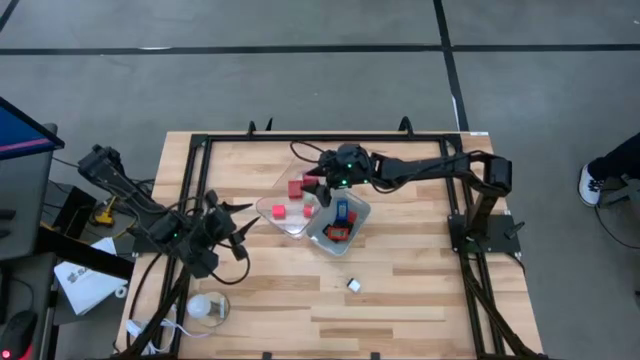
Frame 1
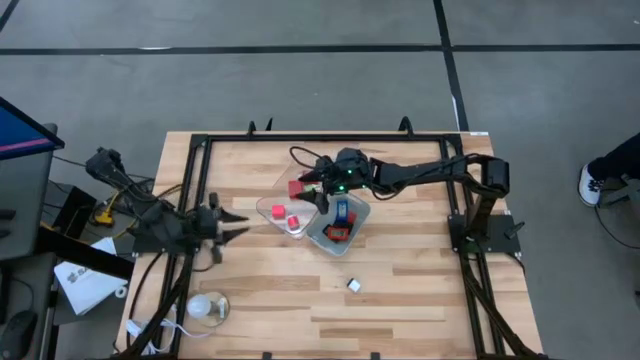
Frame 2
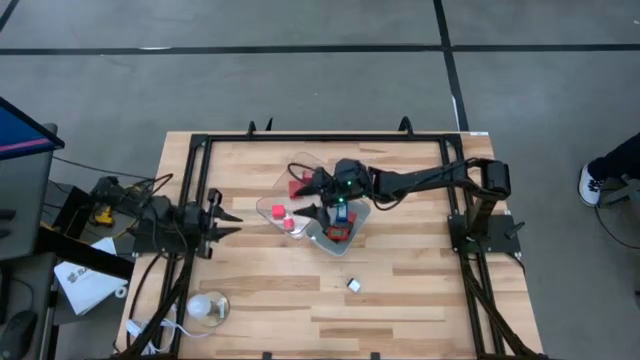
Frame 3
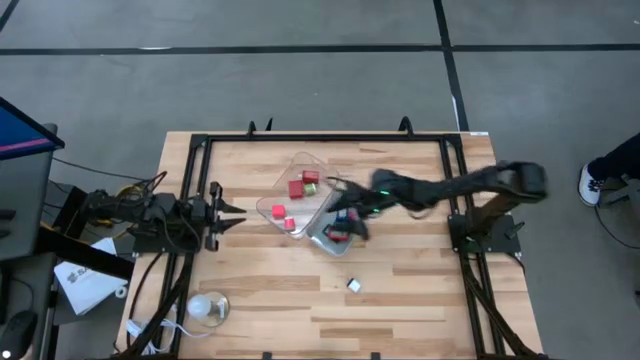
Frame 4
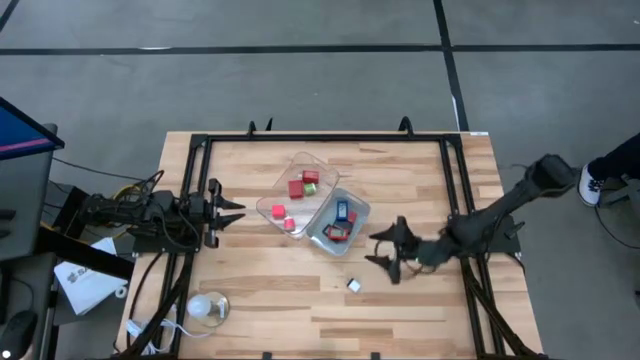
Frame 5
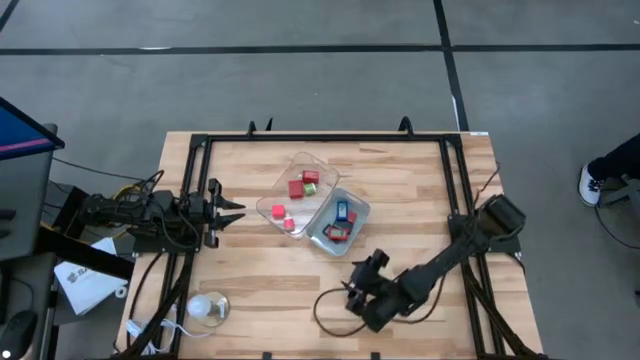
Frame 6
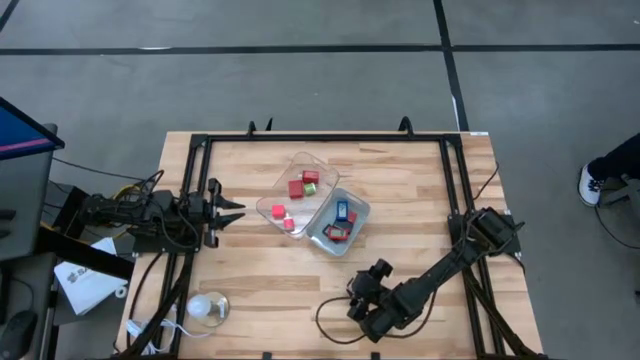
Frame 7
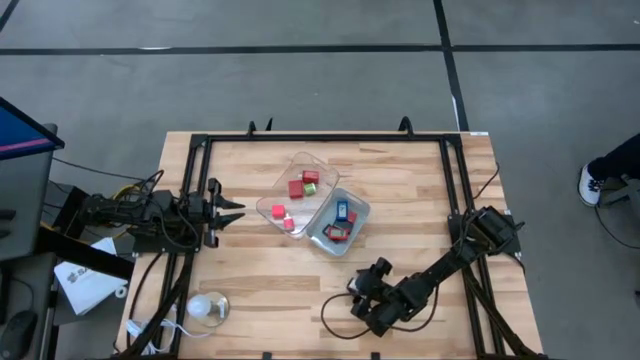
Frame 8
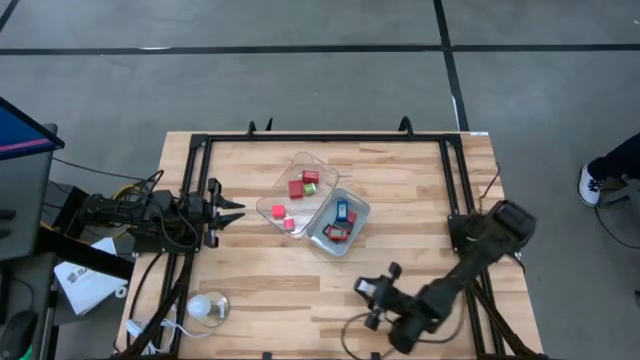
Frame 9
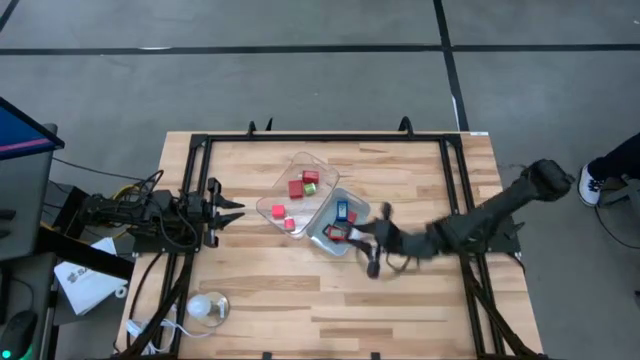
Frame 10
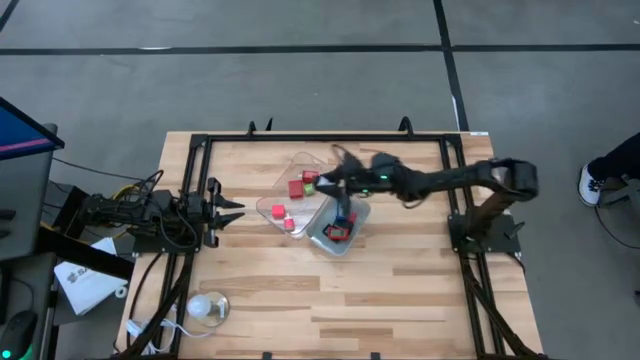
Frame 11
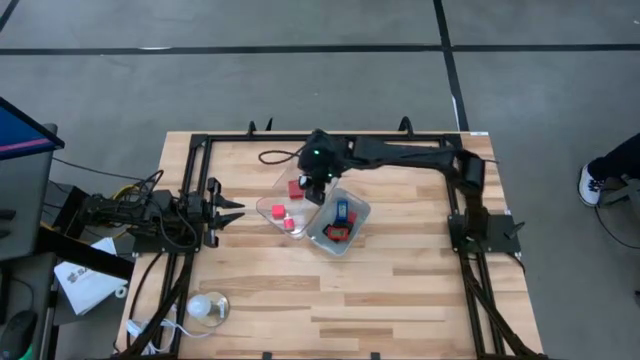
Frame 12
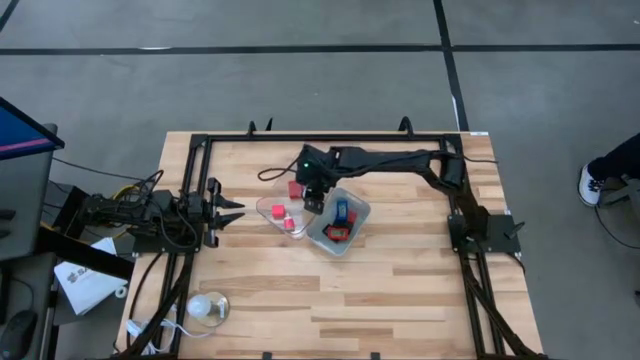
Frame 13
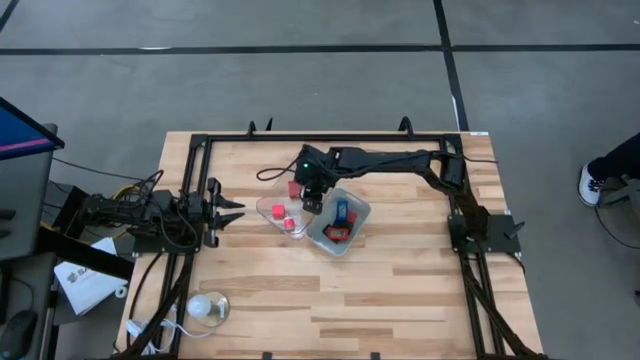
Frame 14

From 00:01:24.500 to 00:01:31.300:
Task: Pick & Place Office items
Put the white charger adapter into the transparent bin

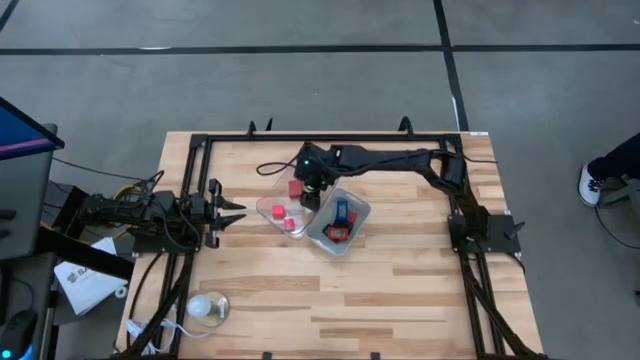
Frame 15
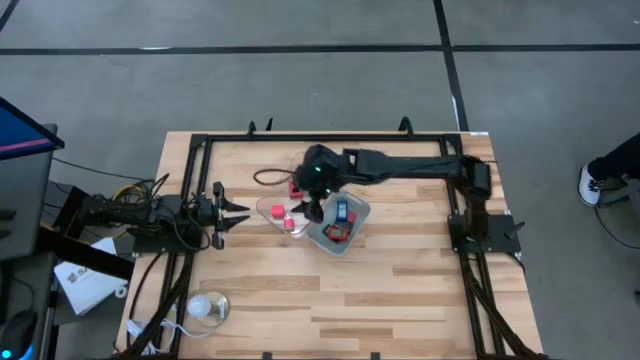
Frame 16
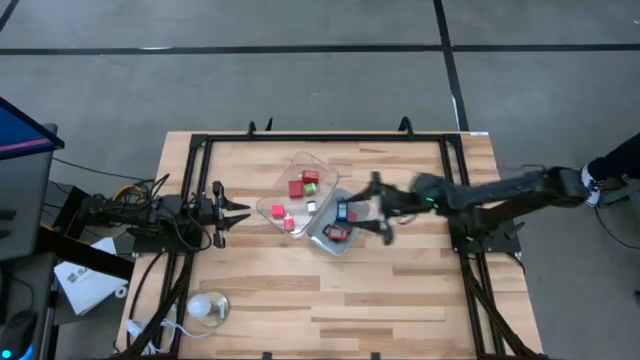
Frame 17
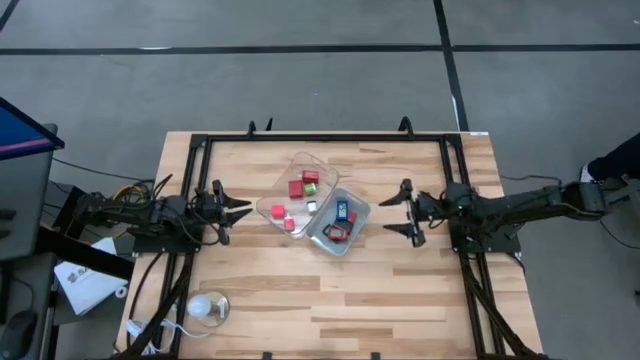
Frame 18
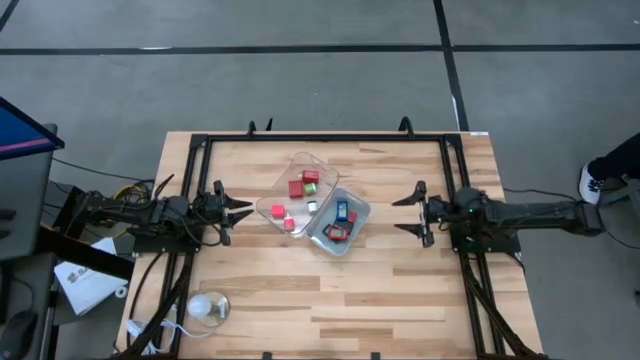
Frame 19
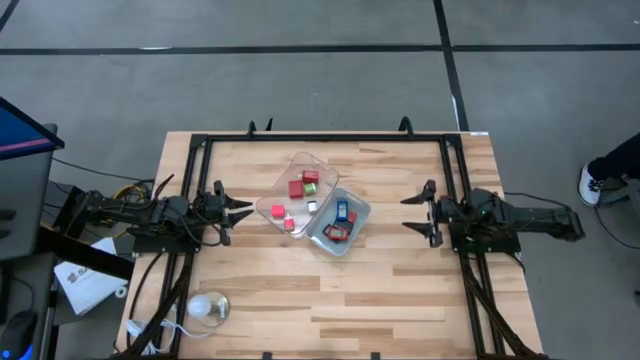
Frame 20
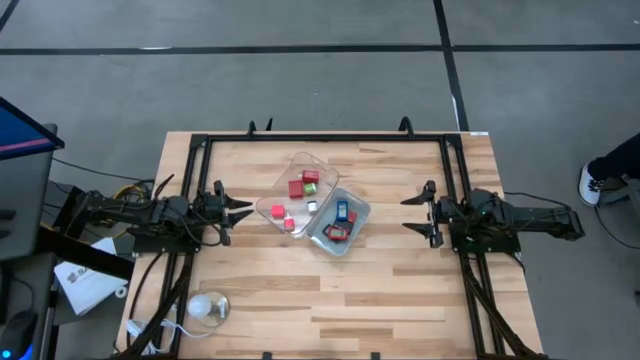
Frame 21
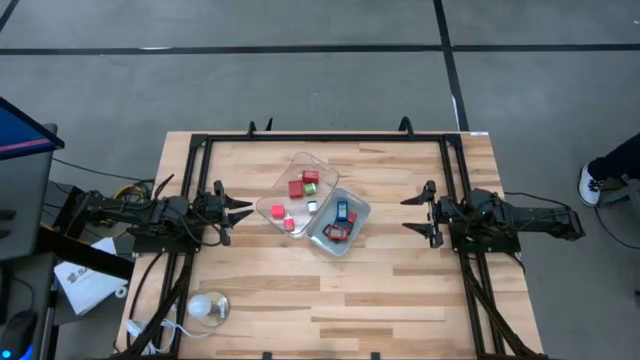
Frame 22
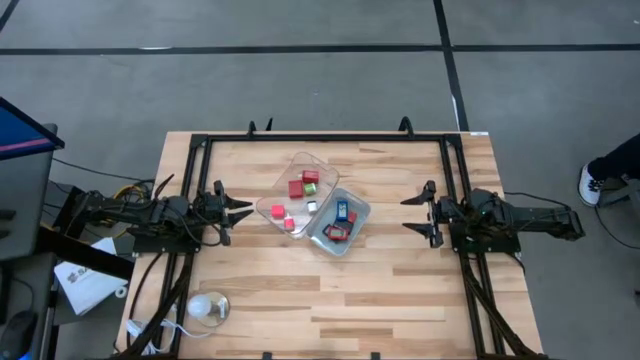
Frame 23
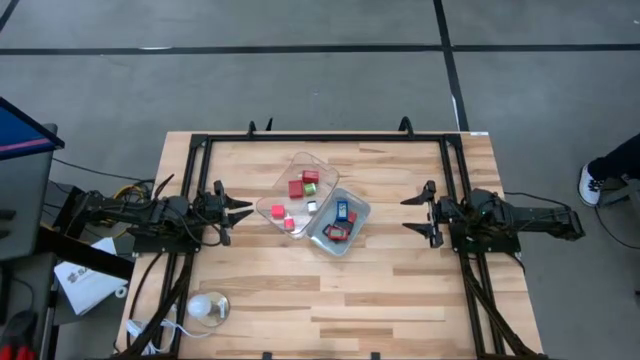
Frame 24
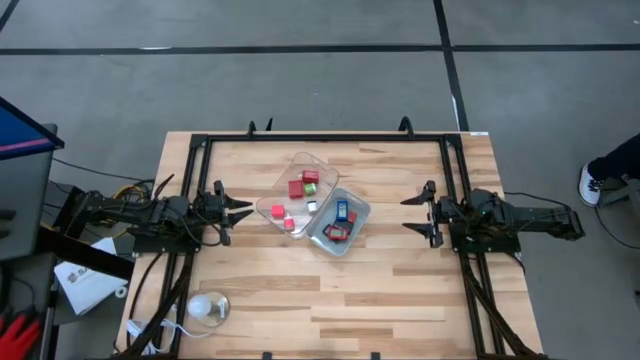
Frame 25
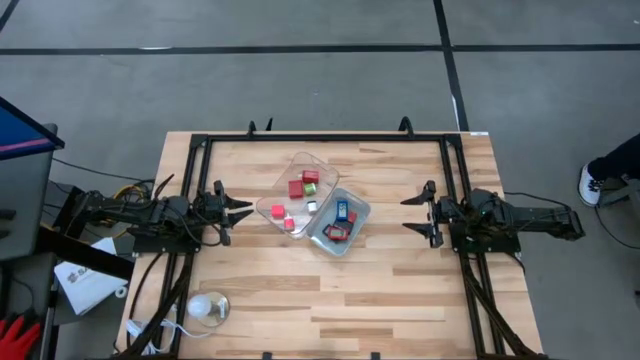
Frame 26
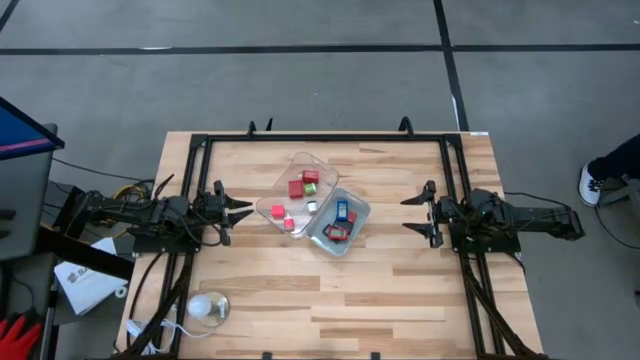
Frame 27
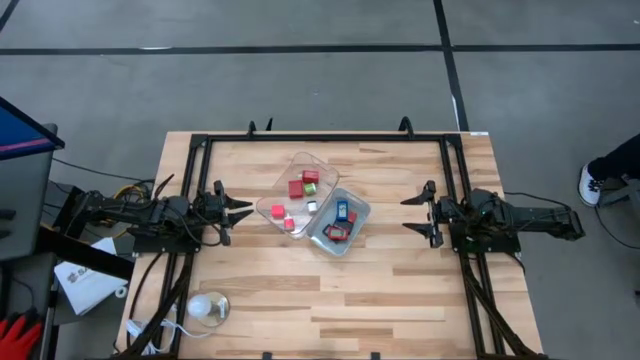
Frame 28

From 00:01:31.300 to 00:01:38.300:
Return to Home Position

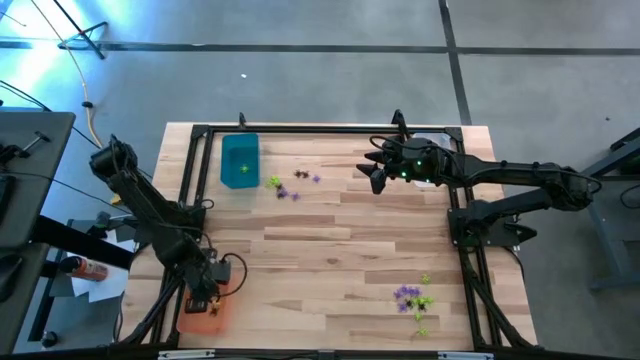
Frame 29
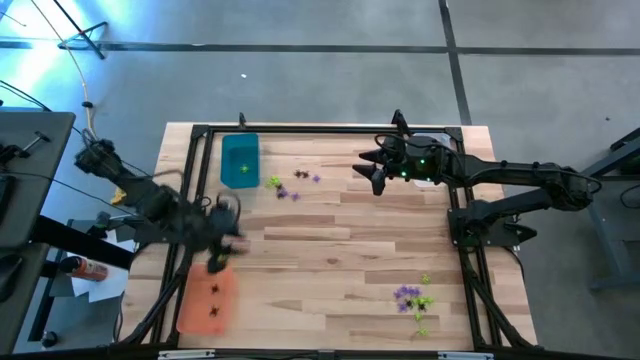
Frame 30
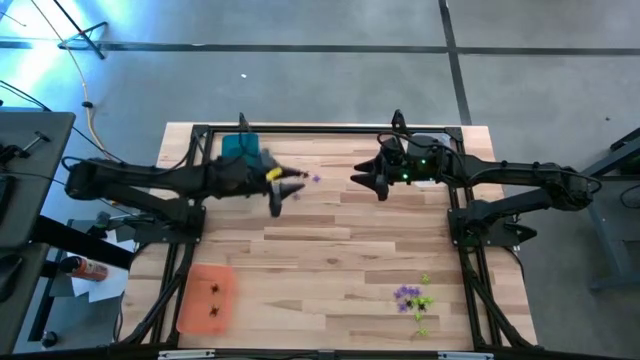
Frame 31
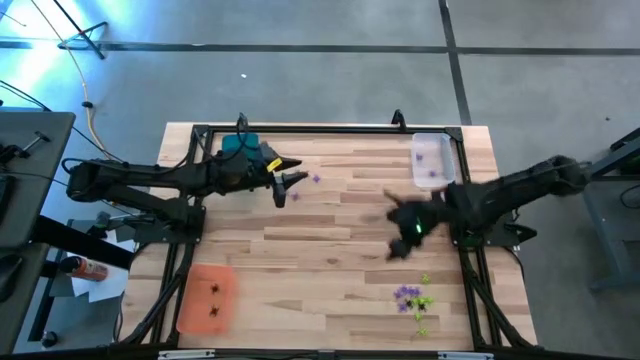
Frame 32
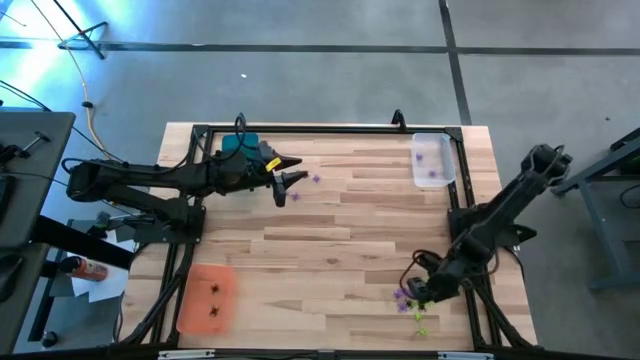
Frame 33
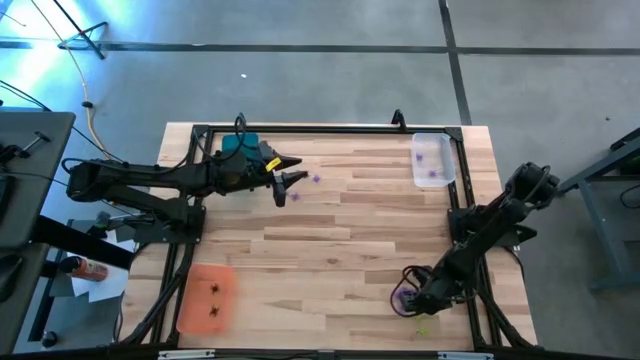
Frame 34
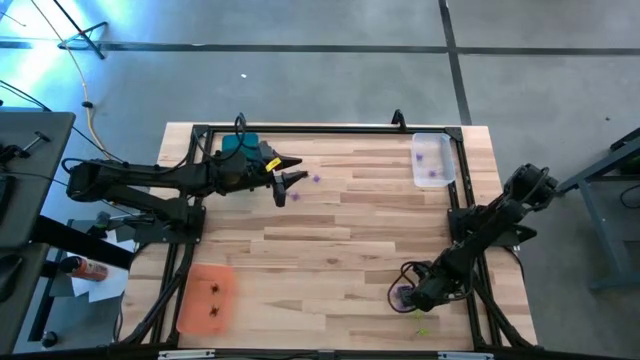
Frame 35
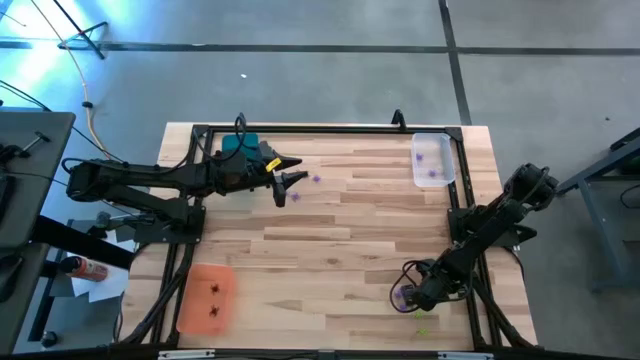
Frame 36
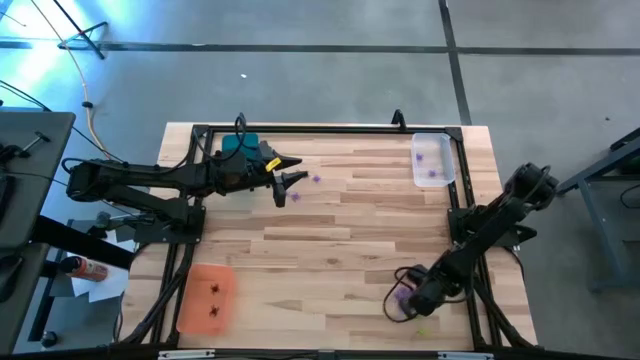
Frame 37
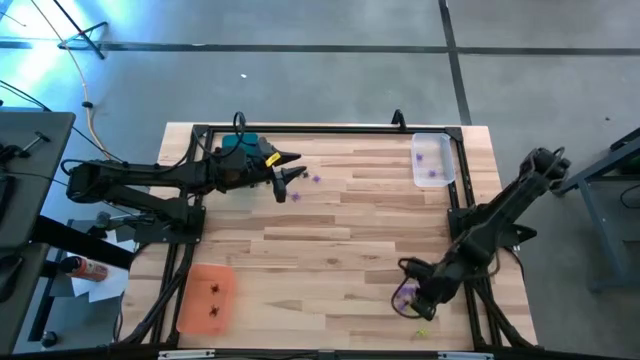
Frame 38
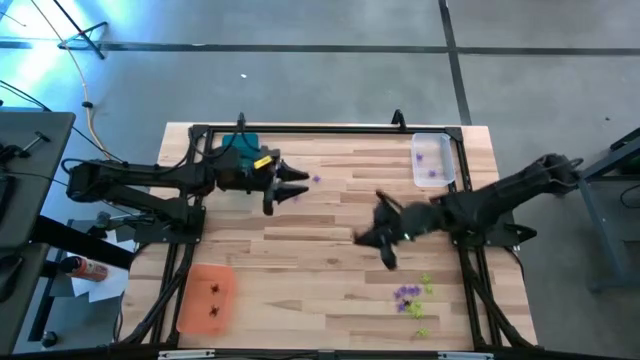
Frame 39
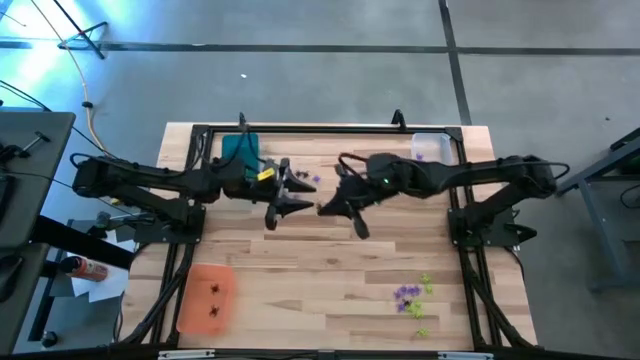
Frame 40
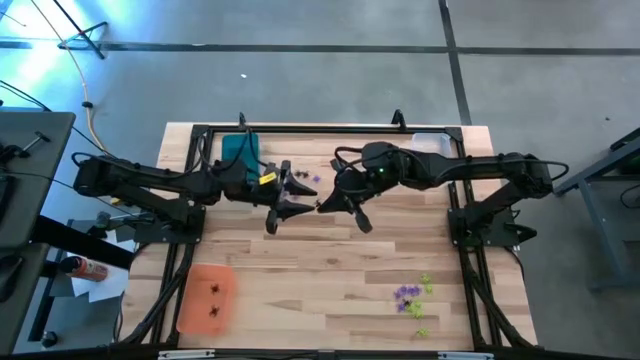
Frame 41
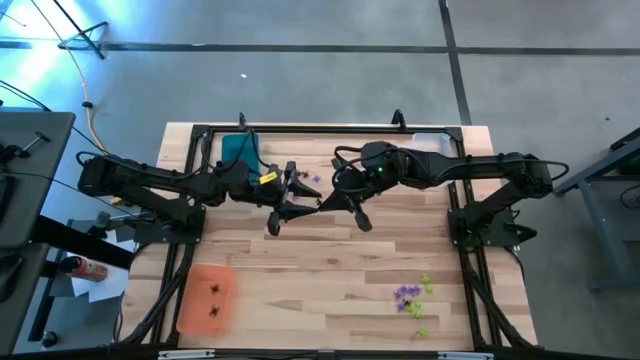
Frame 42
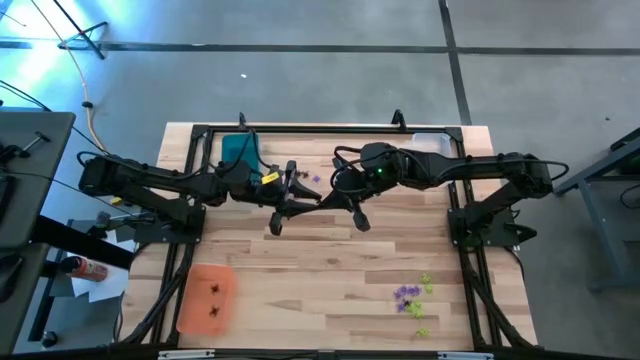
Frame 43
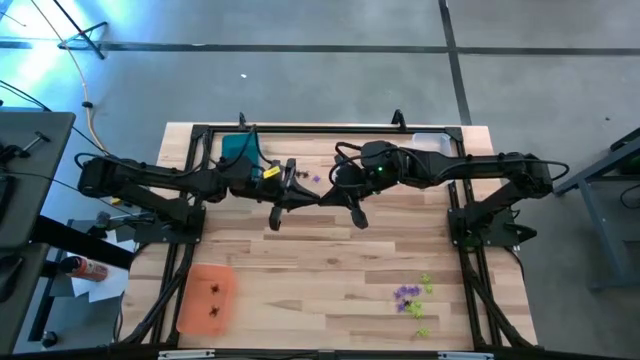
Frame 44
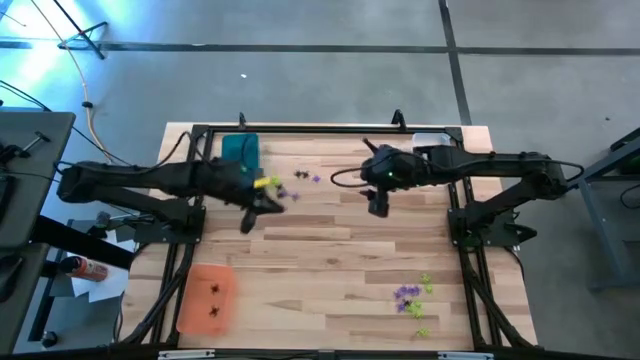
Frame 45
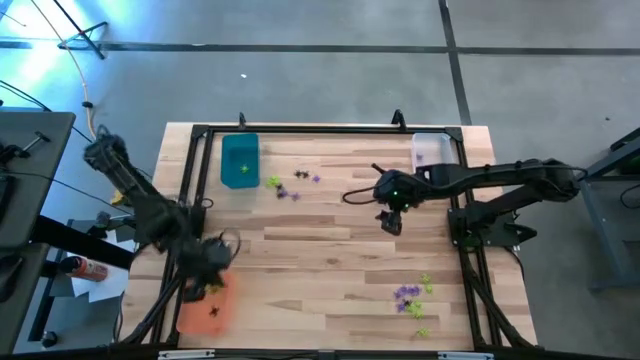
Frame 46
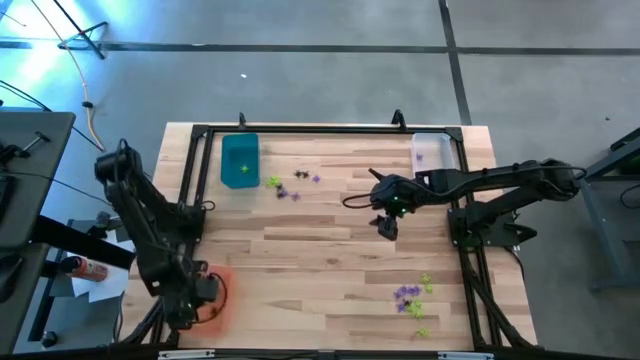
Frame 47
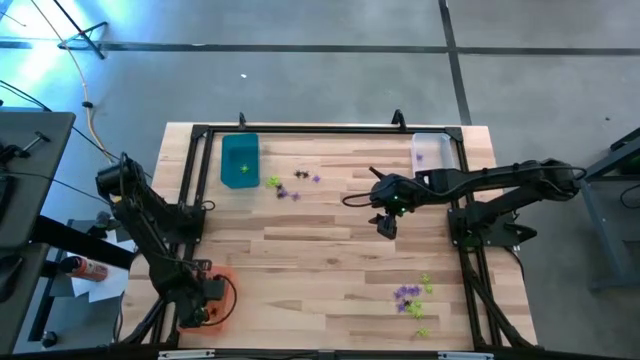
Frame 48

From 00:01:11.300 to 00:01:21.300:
Task: Sort Halloween decoration
Put the black spider toy into the orange bin
